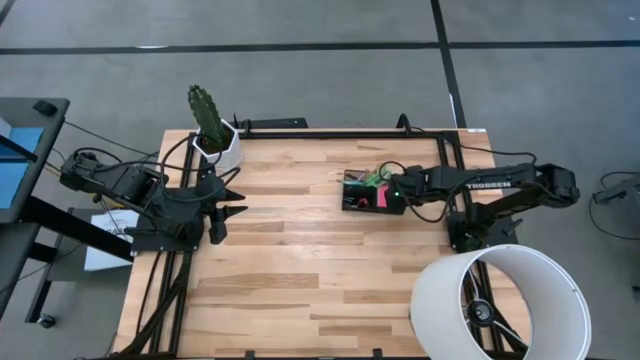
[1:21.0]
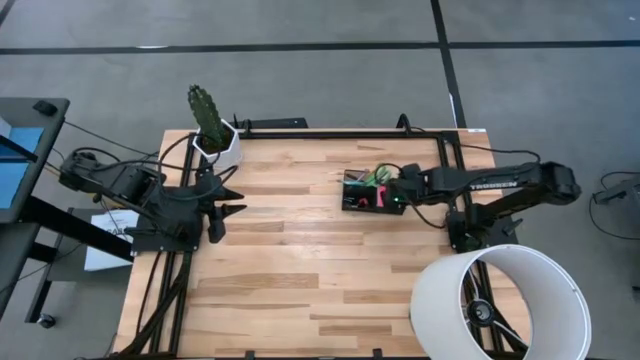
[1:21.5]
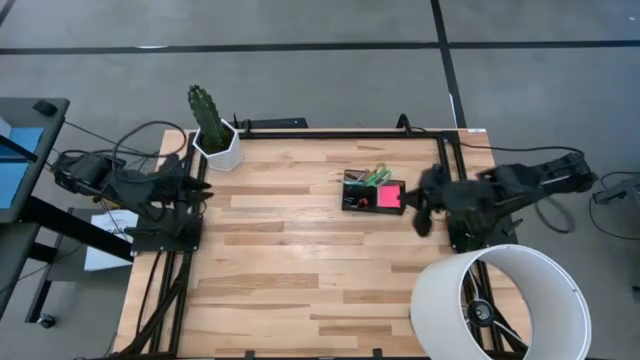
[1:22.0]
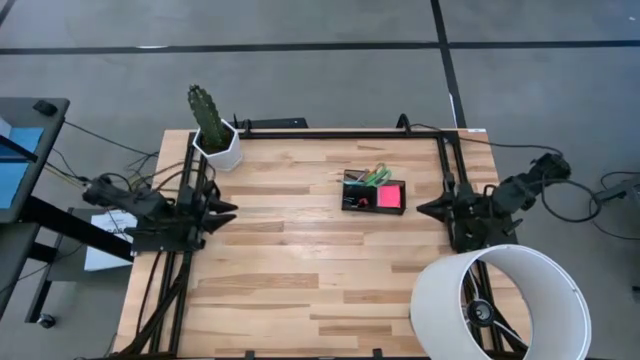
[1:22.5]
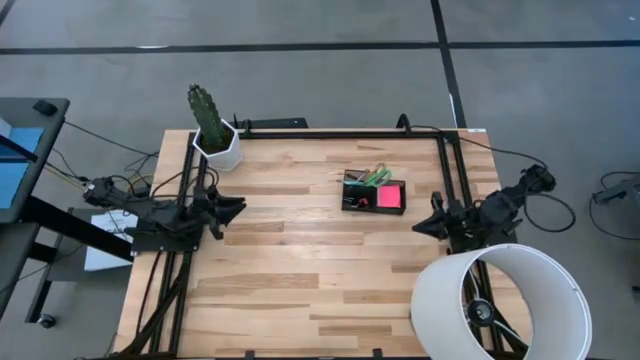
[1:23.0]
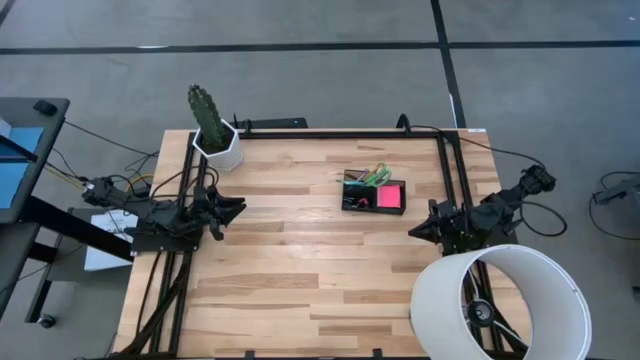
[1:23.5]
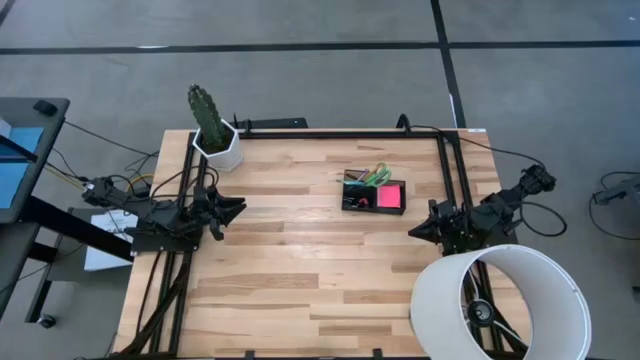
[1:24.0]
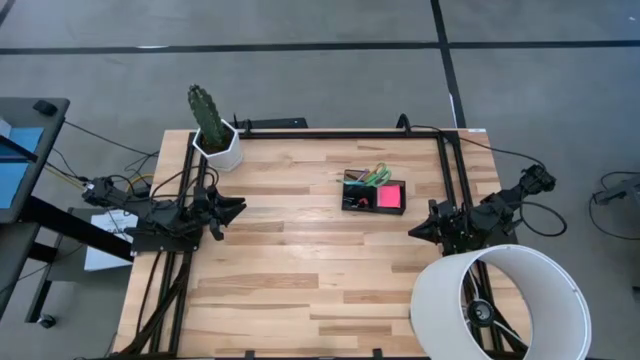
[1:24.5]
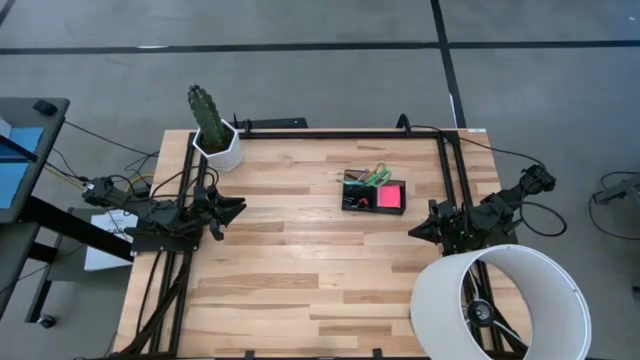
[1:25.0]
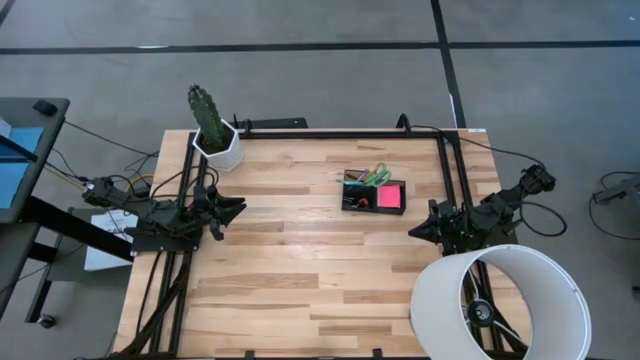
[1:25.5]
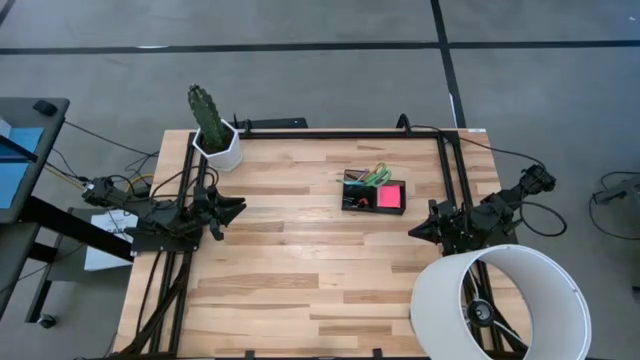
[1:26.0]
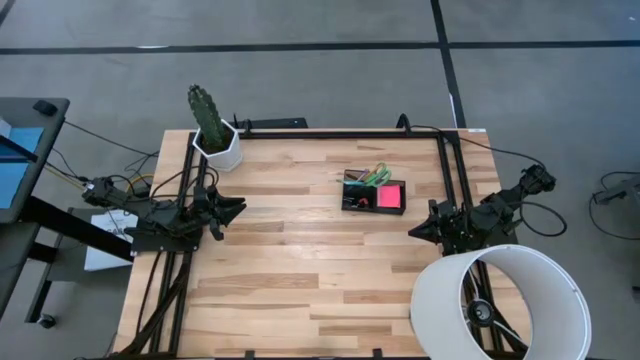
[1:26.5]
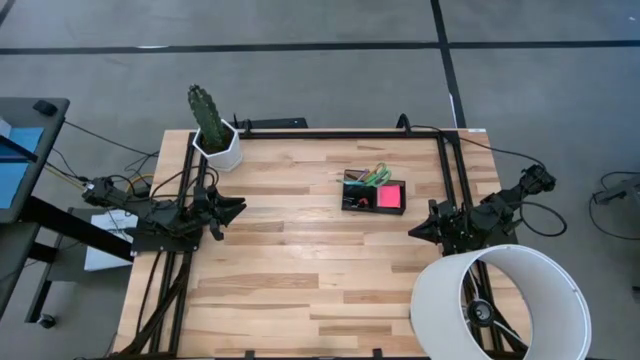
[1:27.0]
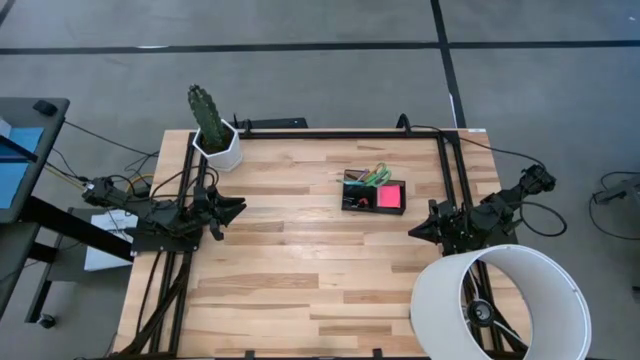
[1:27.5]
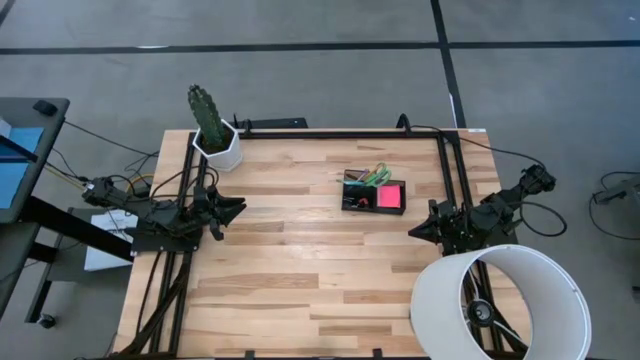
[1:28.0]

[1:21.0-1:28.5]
Task: Pick and place office supplies into organizer
Return to Home Position

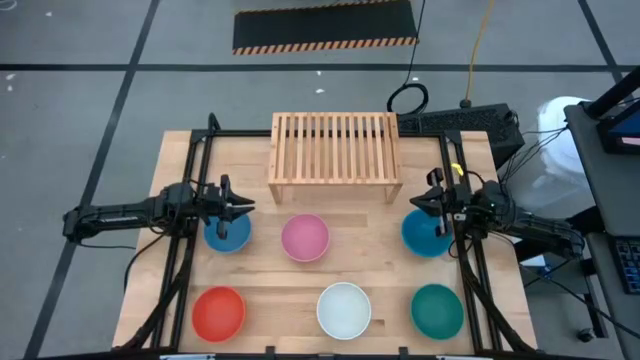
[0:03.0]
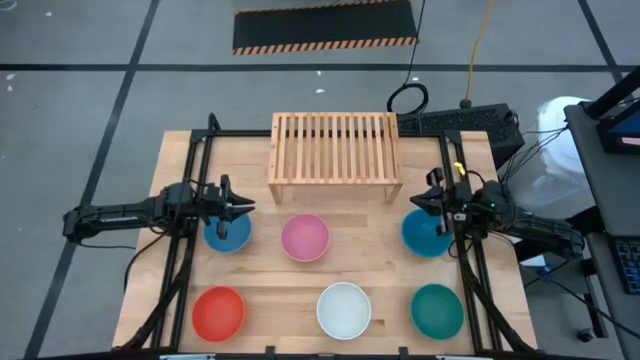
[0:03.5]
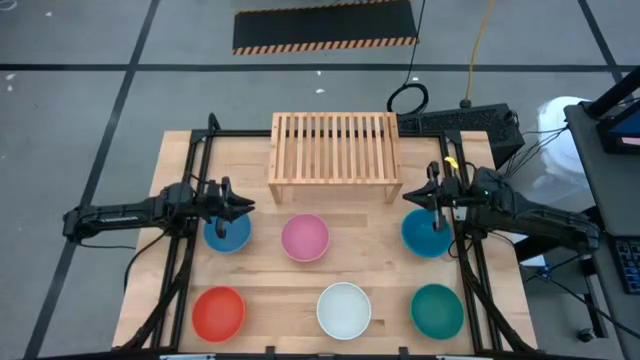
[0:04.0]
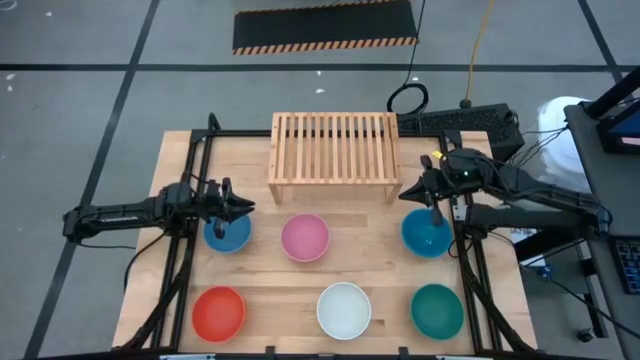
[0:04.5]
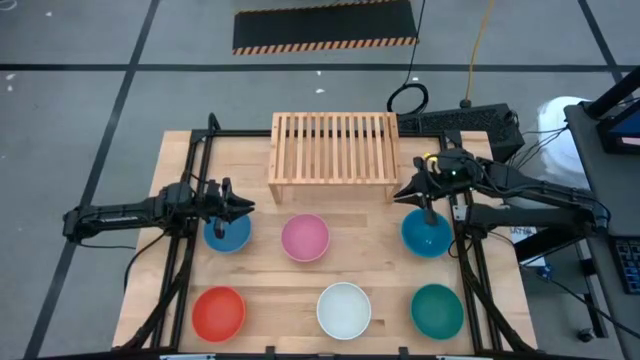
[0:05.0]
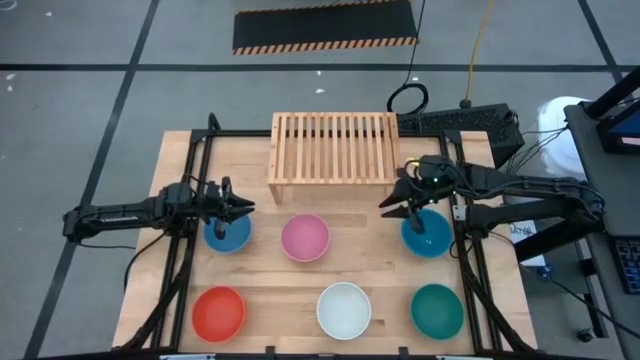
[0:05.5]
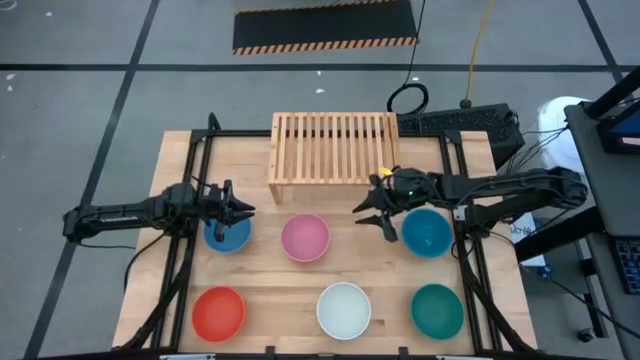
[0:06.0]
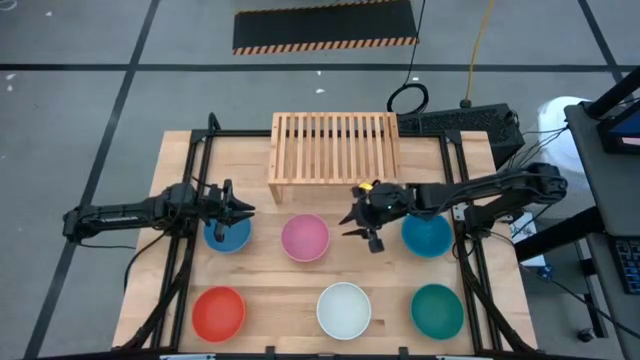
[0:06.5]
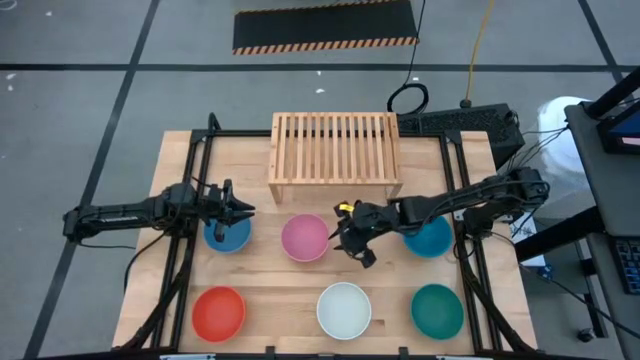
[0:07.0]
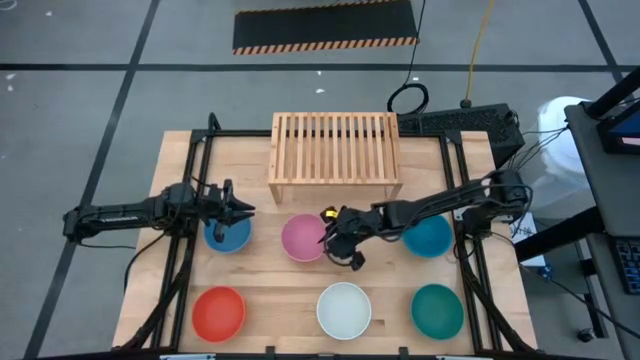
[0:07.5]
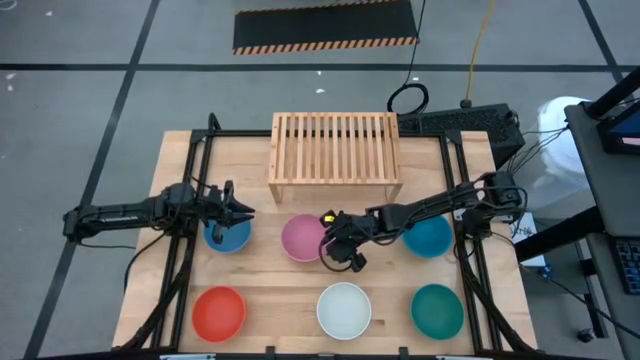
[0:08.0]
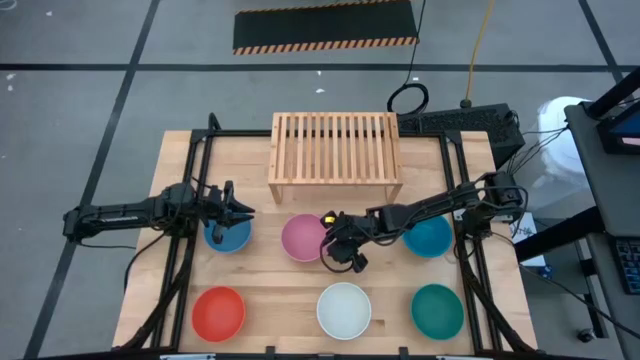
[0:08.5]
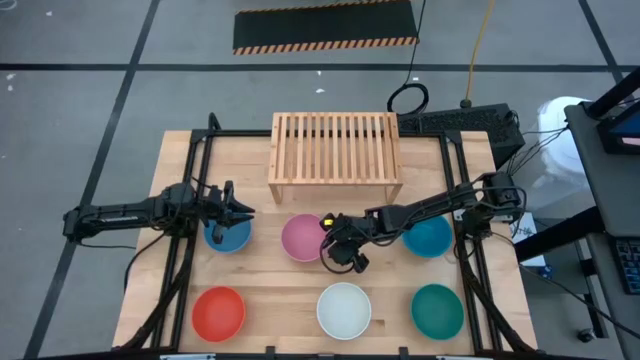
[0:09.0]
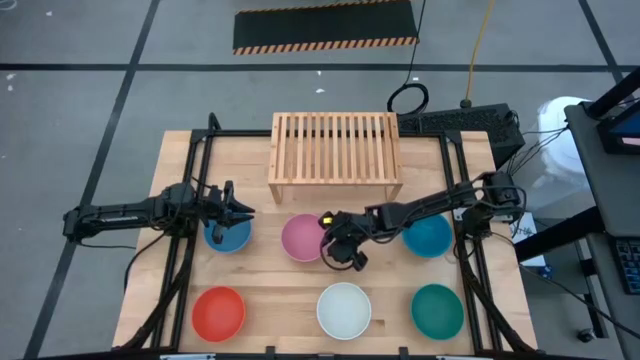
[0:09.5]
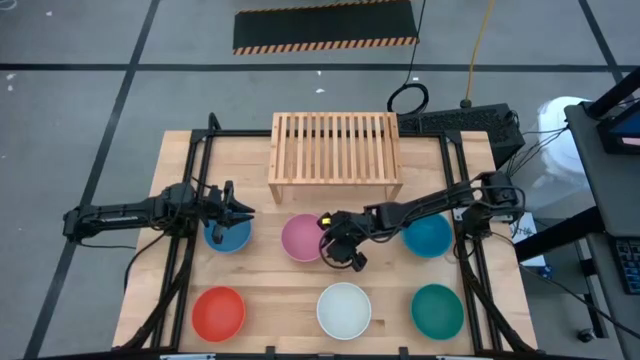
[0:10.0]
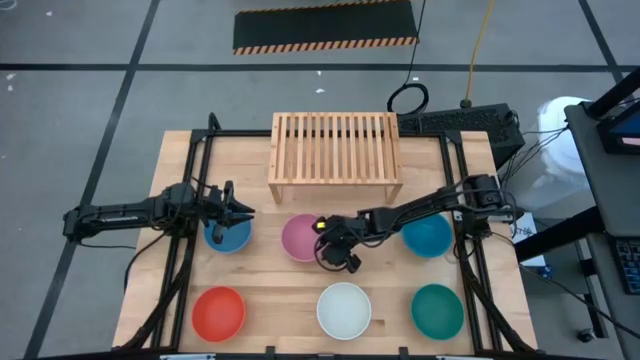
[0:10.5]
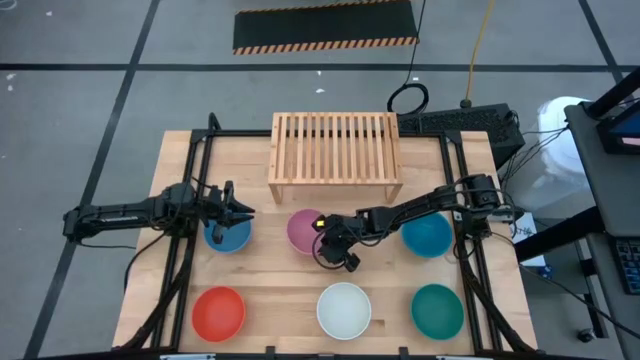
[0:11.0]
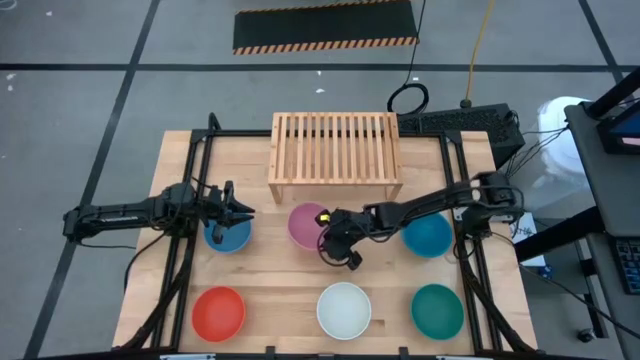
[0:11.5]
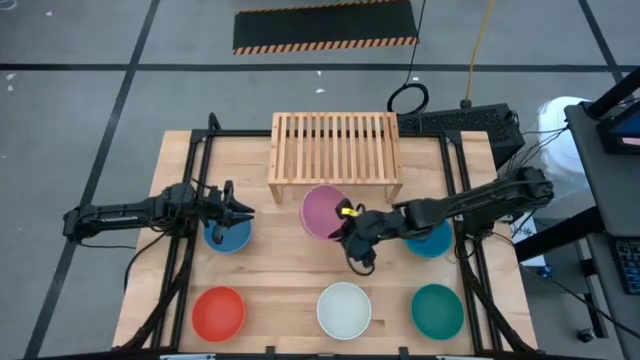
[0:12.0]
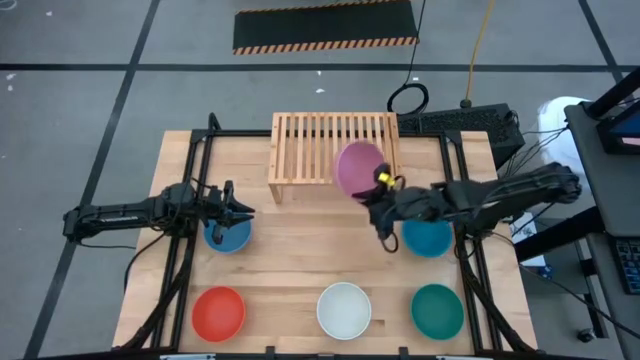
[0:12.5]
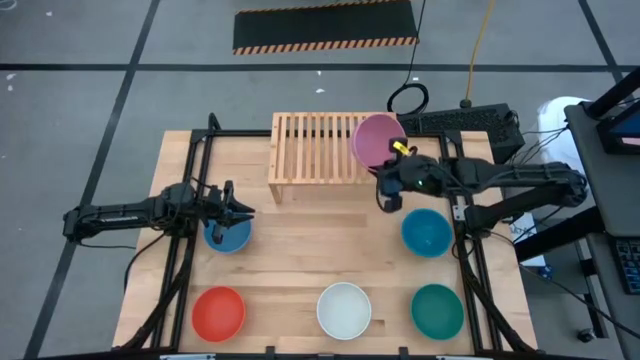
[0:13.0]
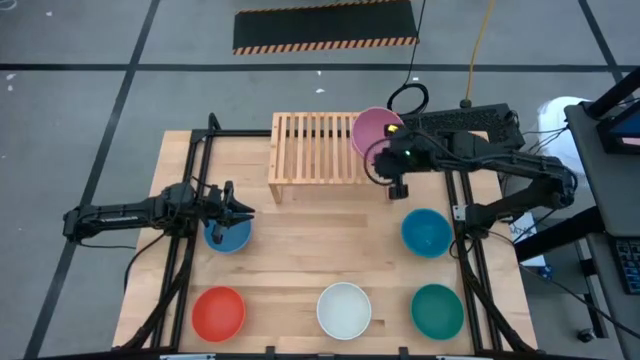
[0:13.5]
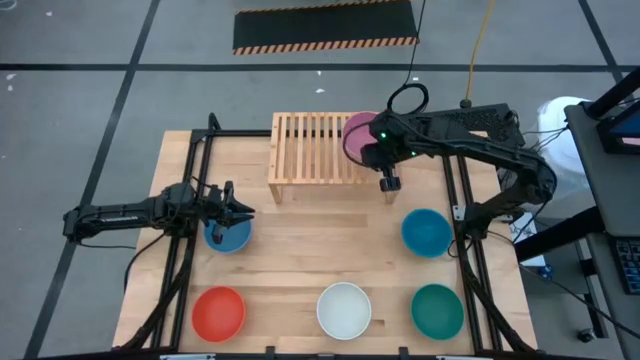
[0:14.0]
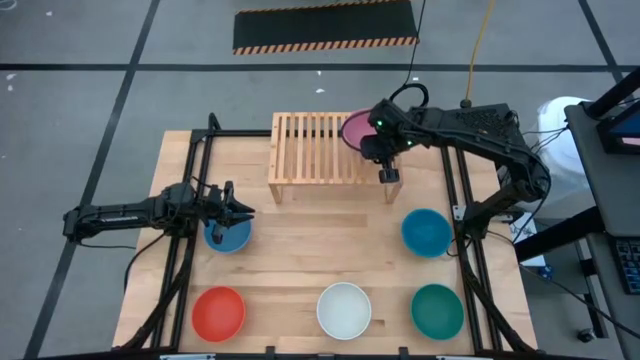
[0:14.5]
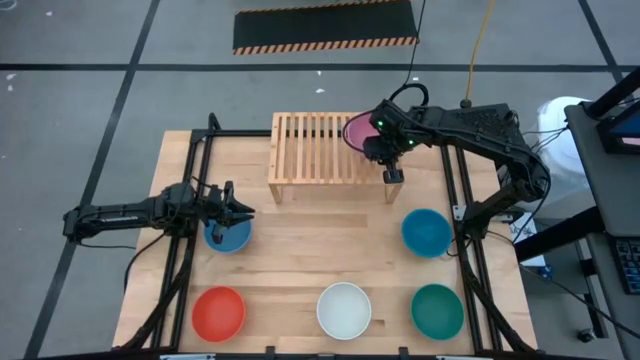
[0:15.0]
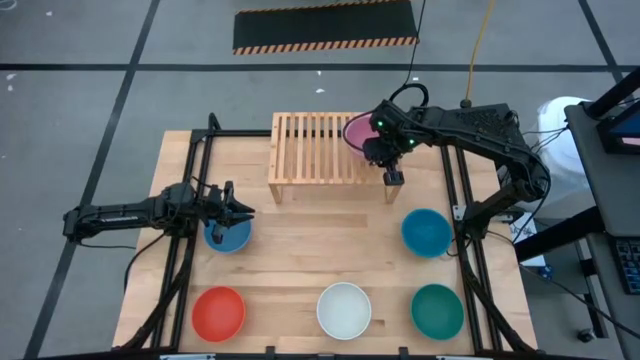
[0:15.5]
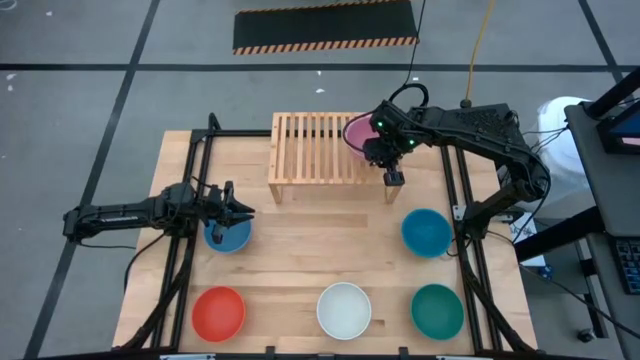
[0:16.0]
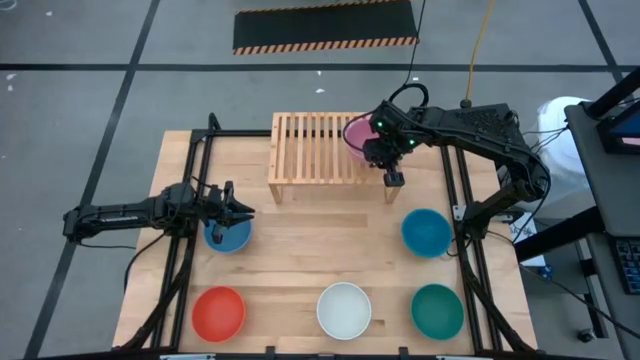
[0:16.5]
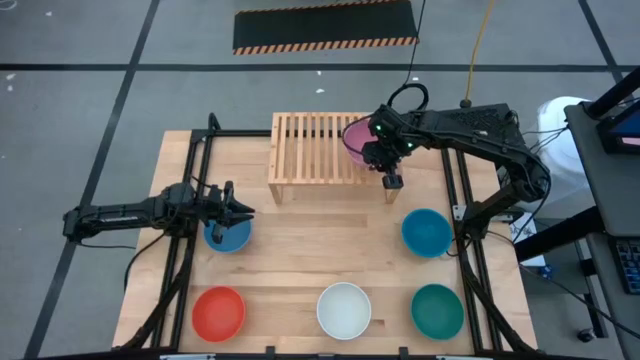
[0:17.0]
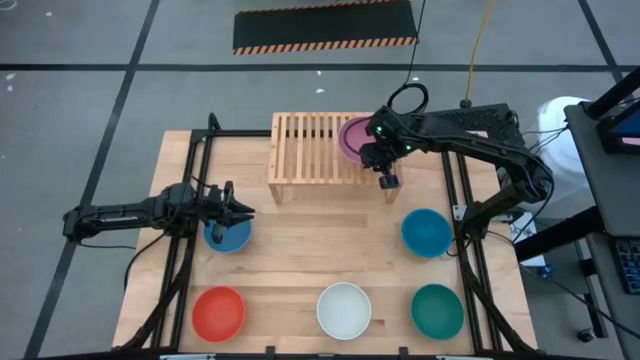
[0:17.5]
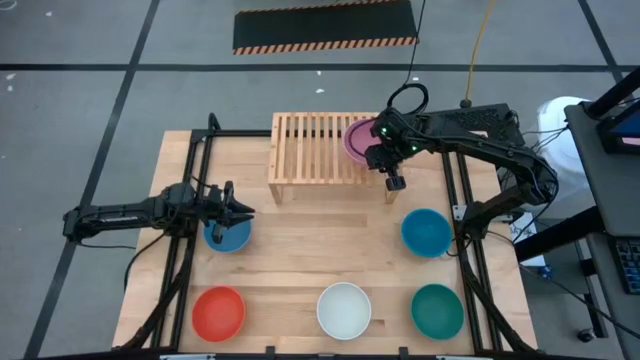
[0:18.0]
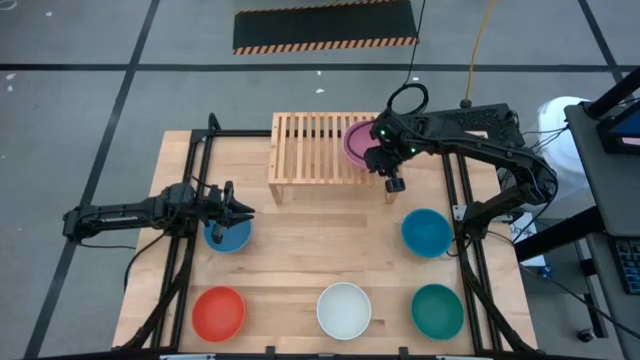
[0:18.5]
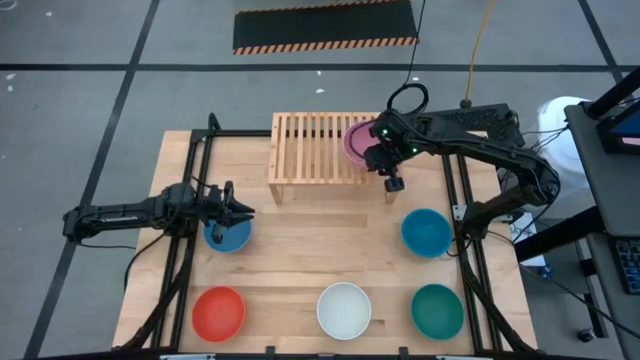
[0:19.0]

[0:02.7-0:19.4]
Task: Place and stack bowls onto a shelf
Put the pink bowl on the shelf
